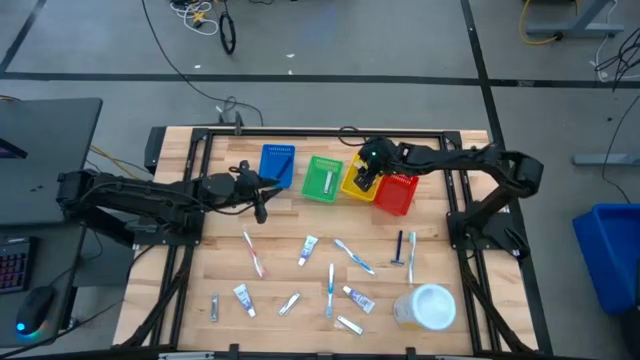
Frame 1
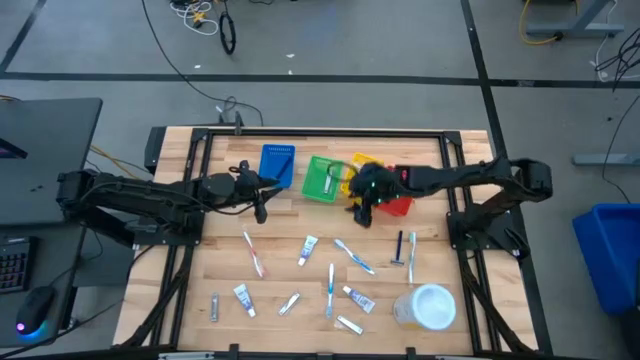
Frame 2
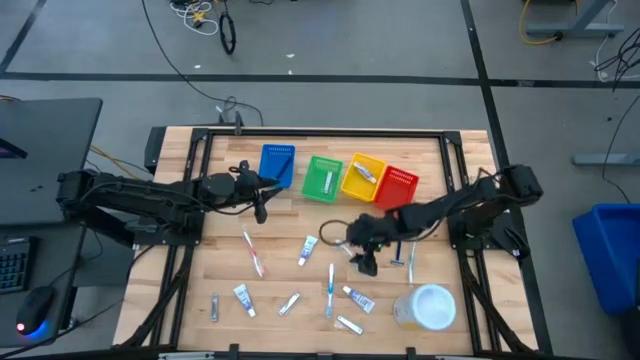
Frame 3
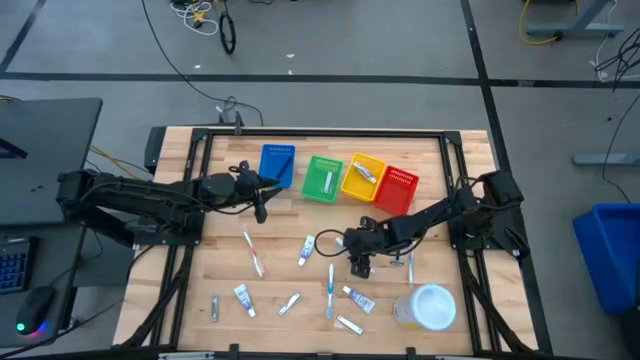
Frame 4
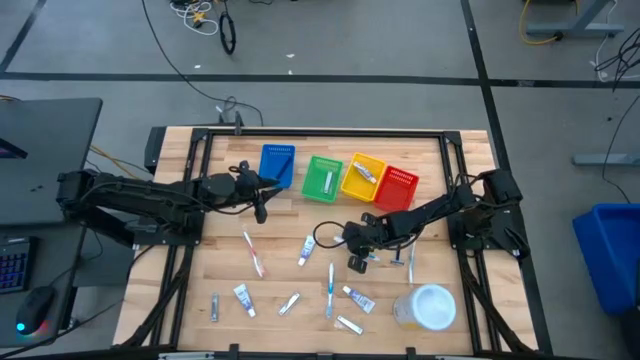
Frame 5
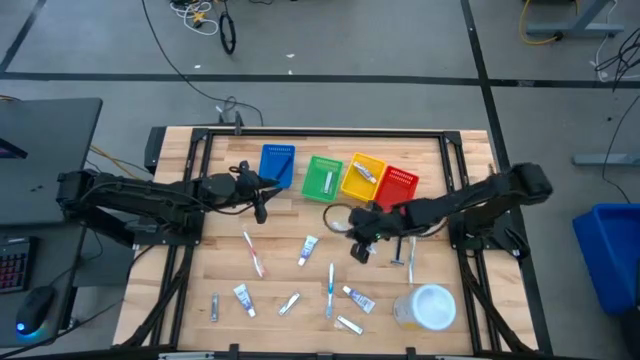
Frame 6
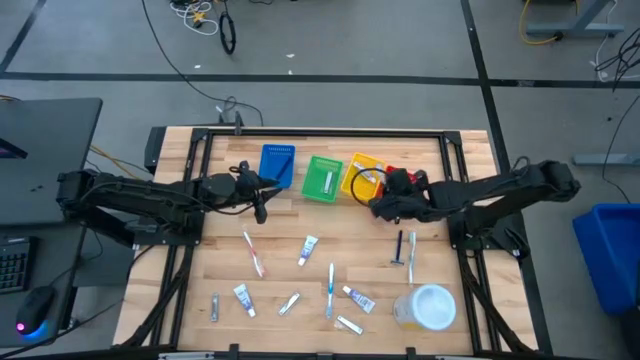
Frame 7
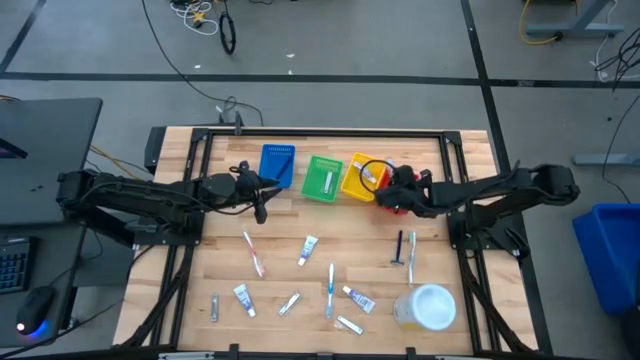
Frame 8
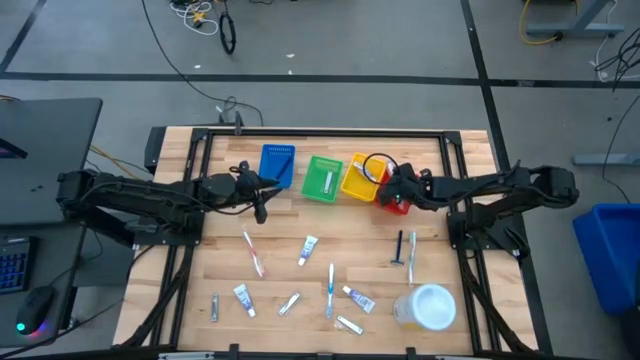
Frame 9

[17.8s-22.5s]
Task: Pick & Place Travel size toiletries
Put the right blue toothbrush into the red bin

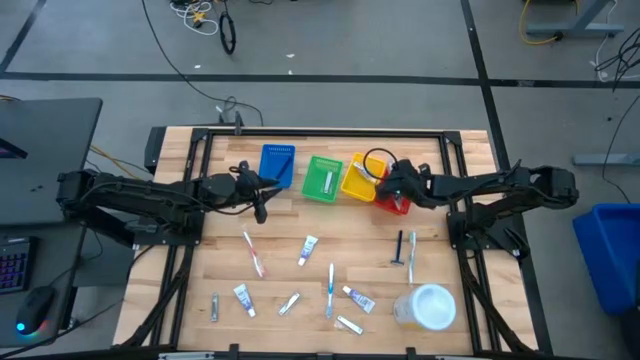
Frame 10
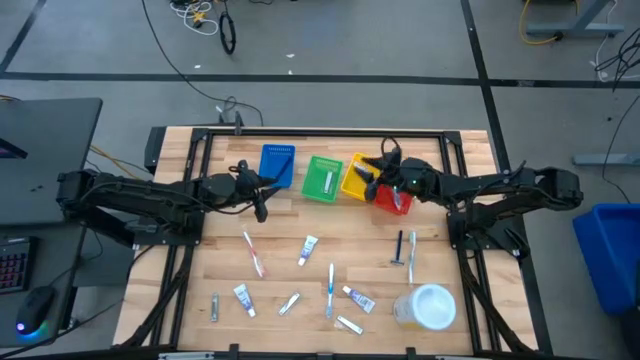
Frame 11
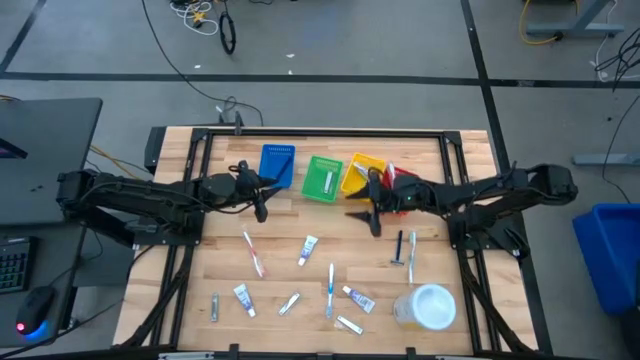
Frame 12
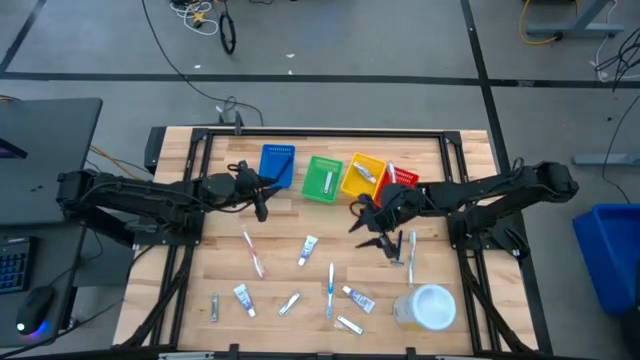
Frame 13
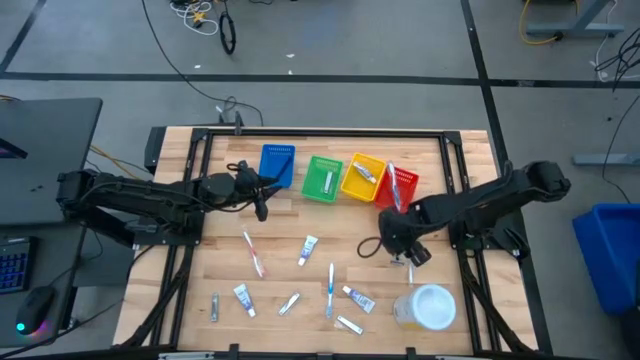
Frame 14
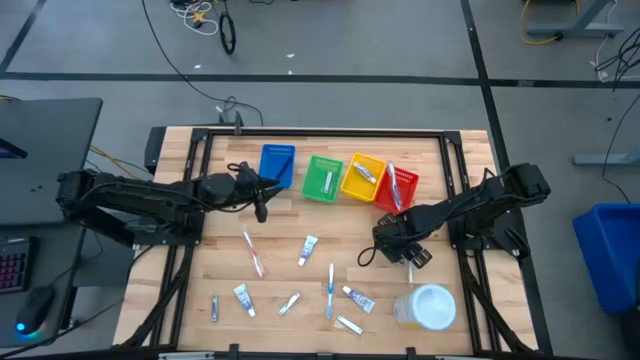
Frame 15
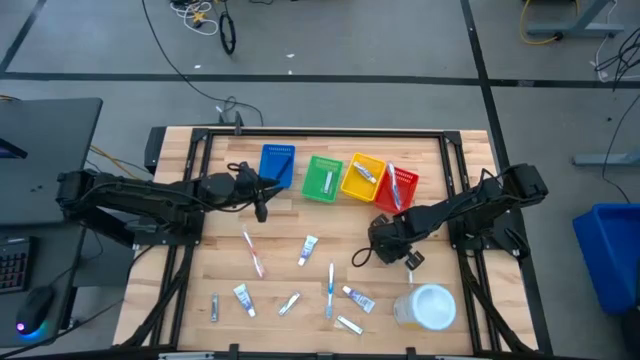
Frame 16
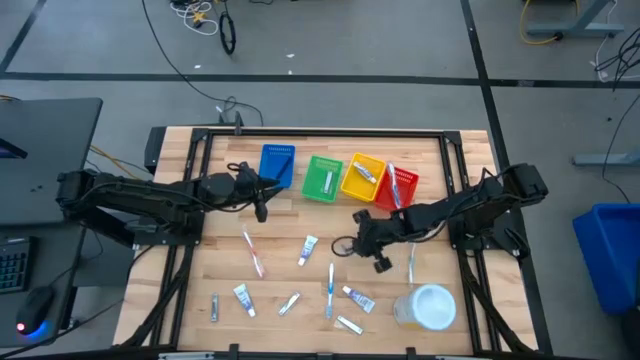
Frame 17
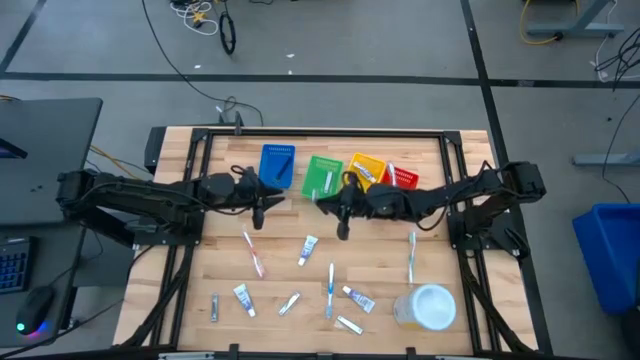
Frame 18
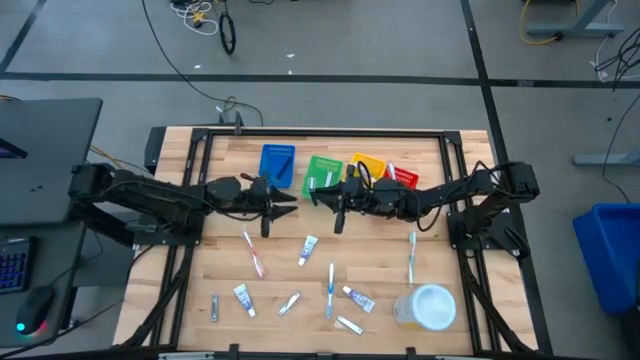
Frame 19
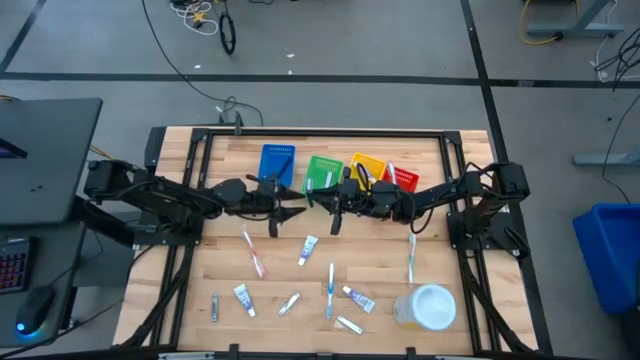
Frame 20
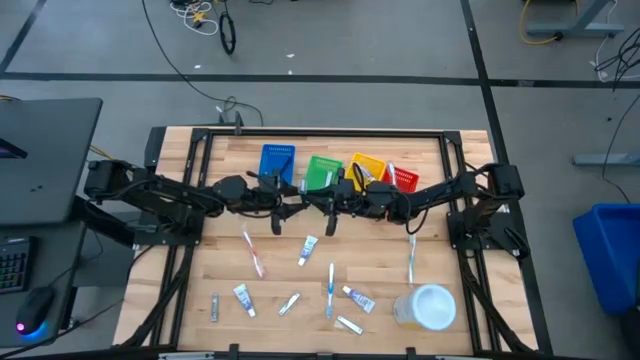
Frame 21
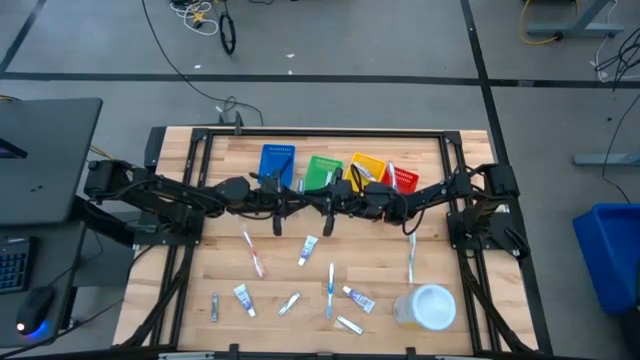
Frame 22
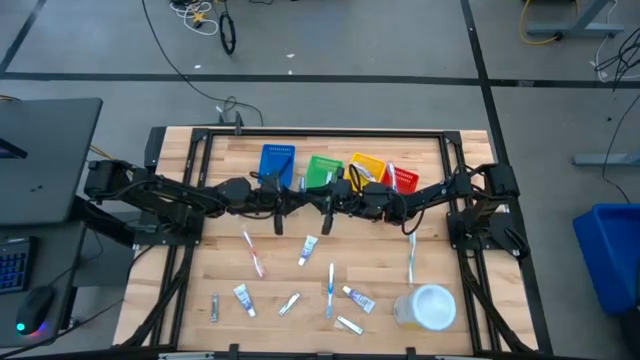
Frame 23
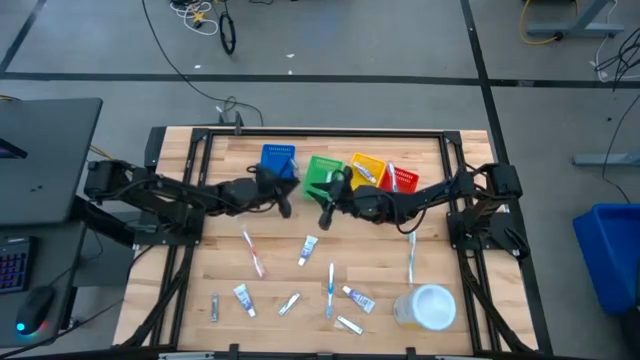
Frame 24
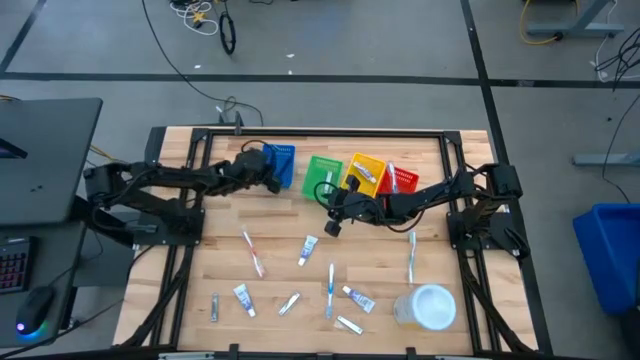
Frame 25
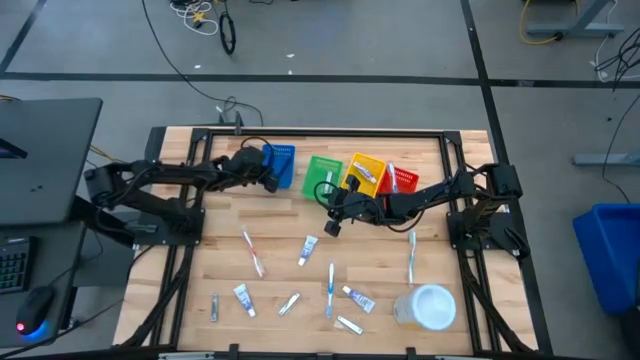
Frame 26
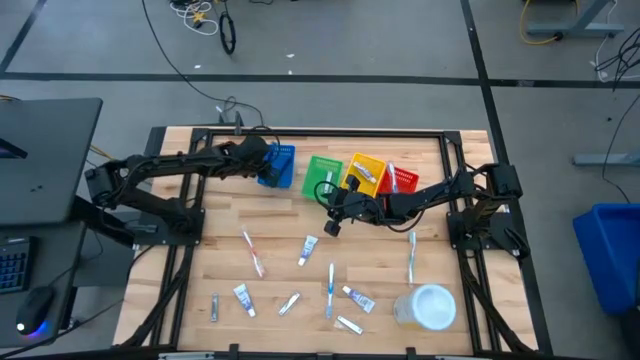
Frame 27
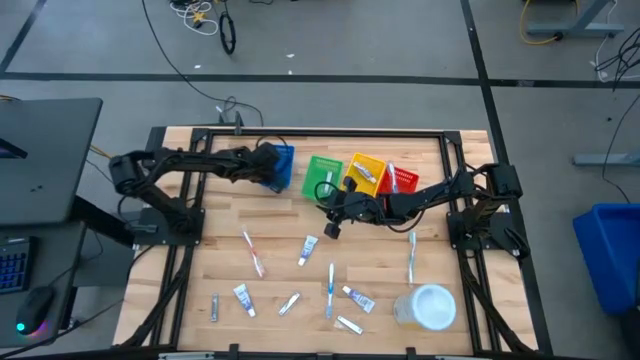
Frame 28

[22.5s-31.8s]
Put the blue razor into the blue bin

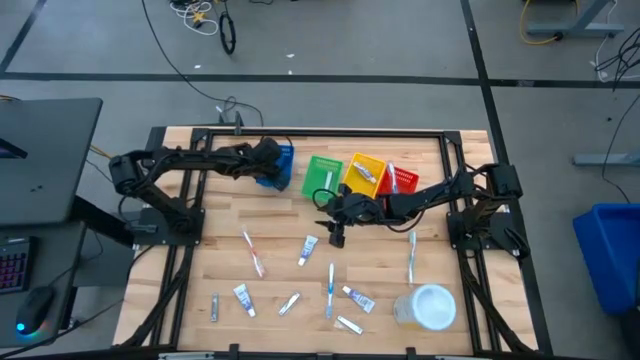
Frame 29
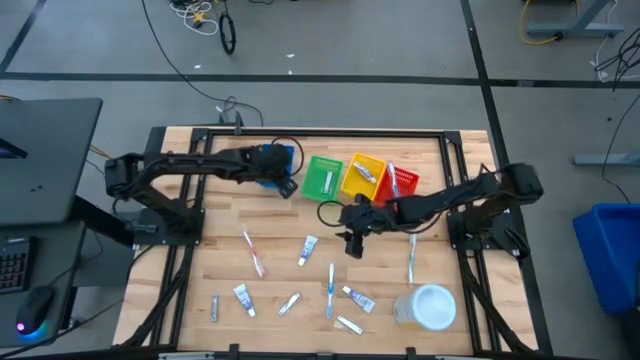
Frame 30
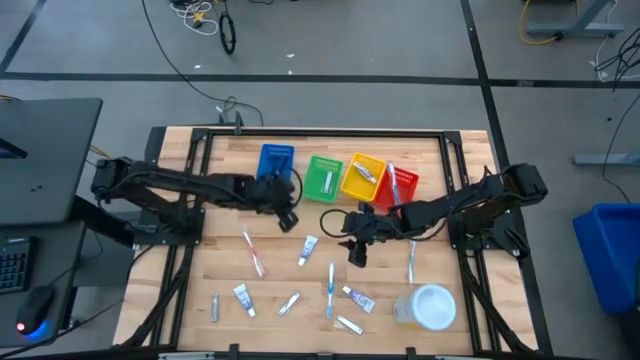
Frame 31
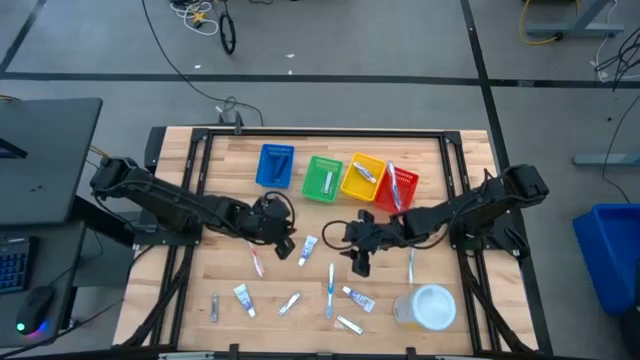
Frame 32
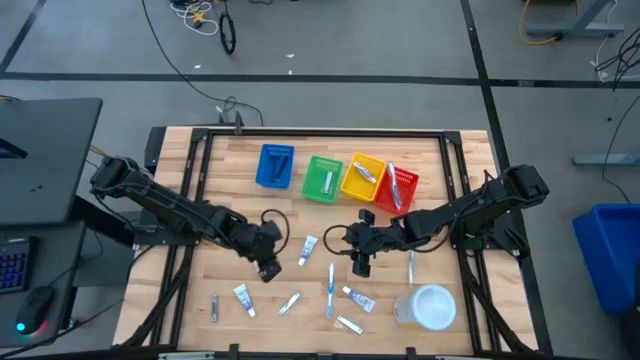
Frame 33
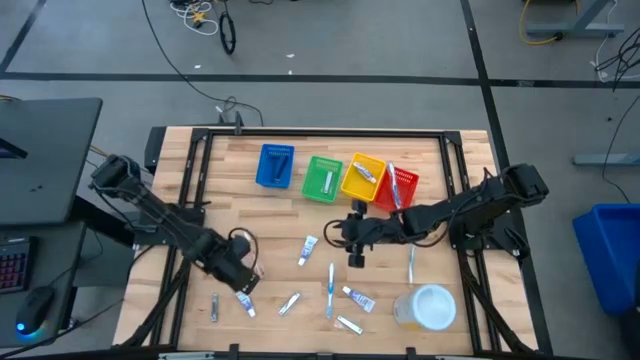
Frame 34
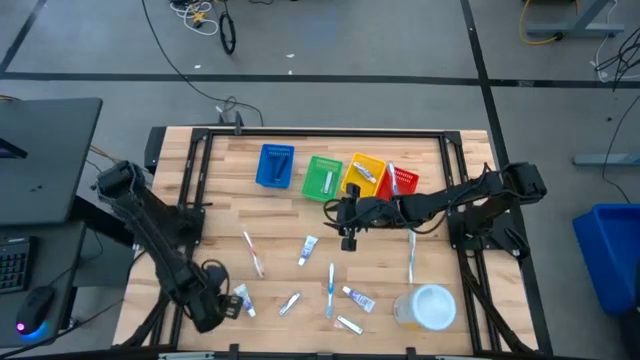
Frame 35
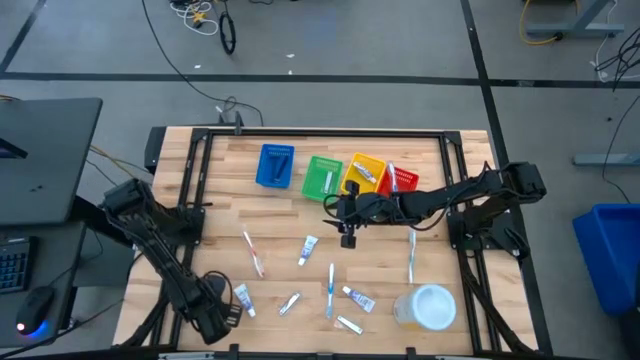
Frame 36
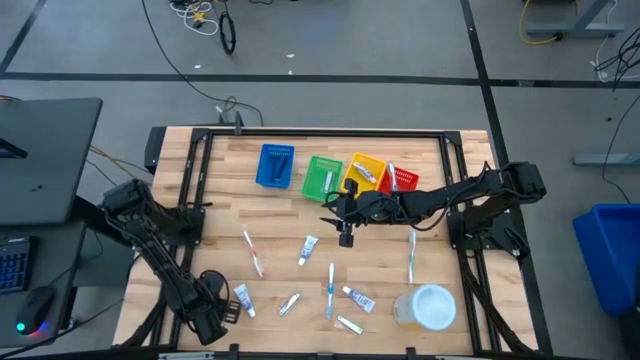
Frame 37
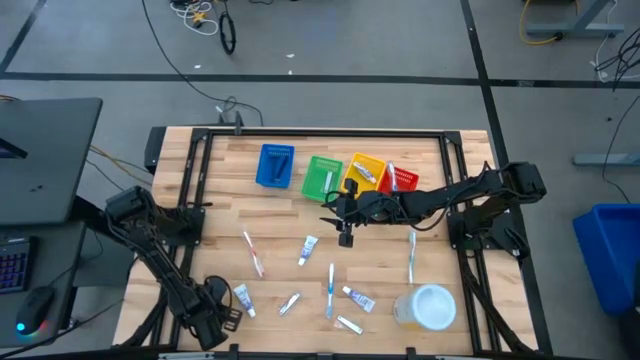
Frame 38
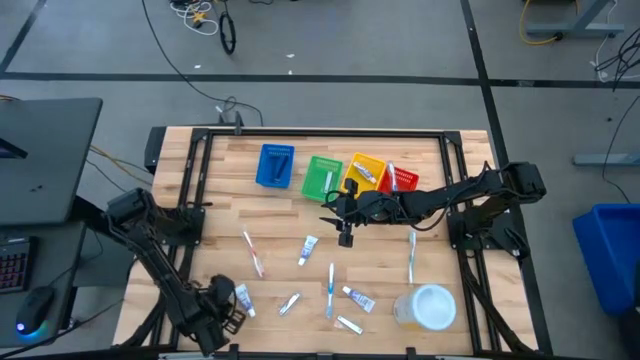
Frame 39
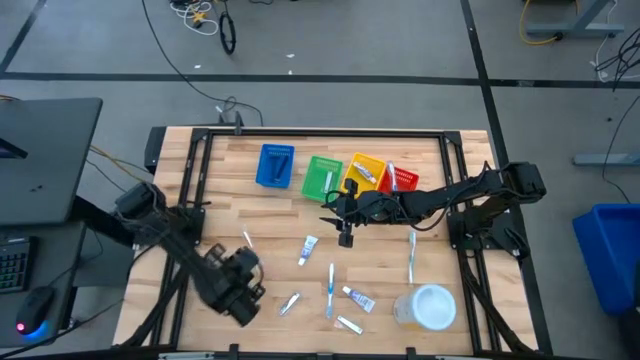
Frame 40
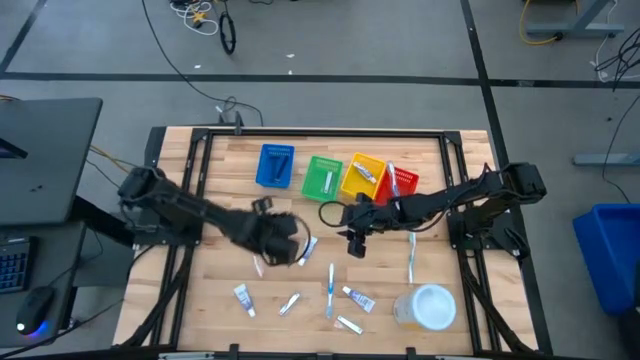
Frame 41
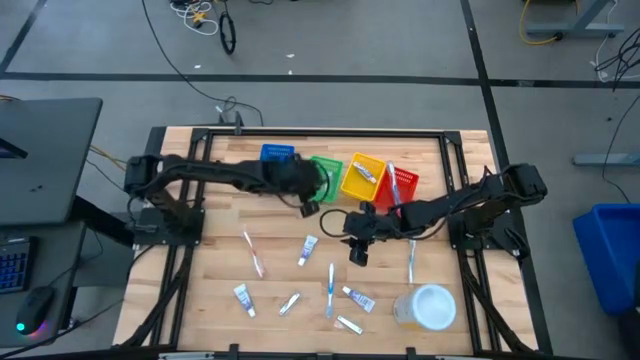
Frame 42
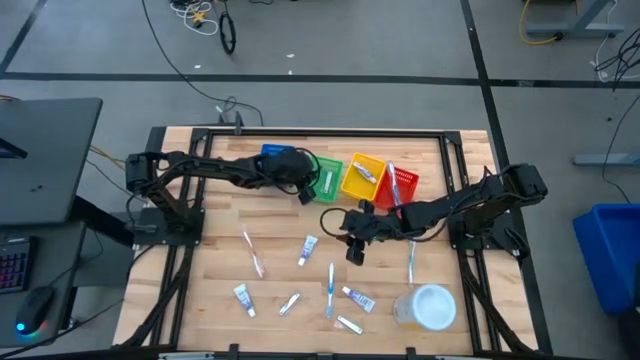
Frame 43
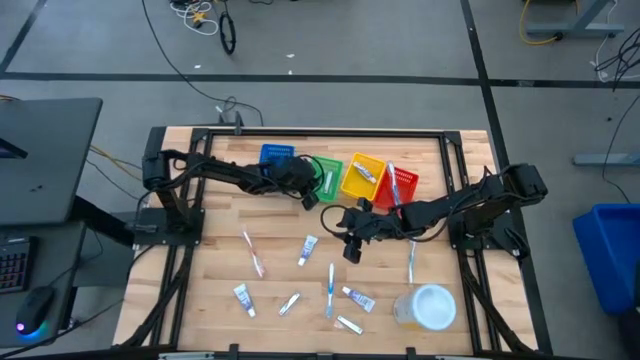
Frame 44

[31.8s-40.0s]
Put the left silver nail cutter into the green bin

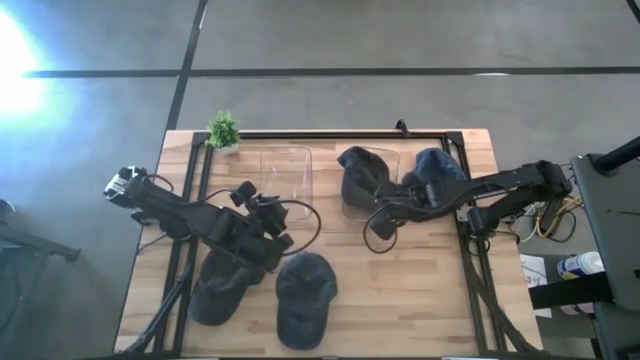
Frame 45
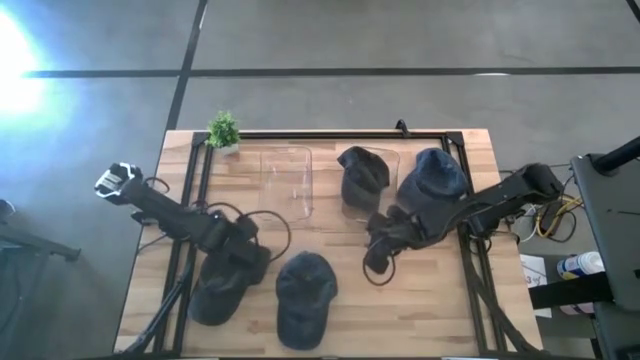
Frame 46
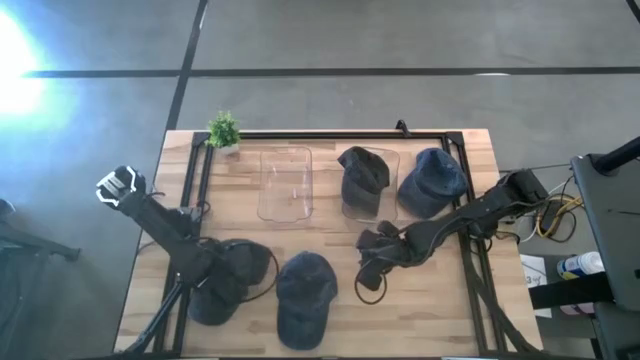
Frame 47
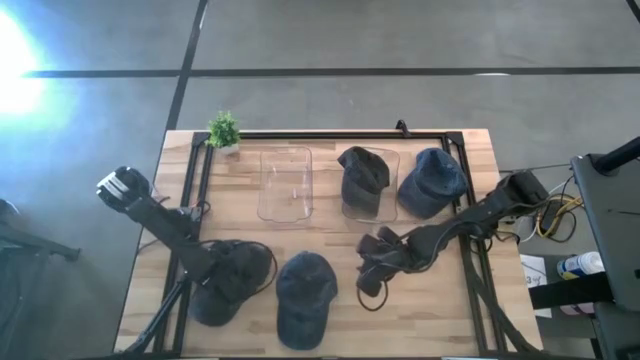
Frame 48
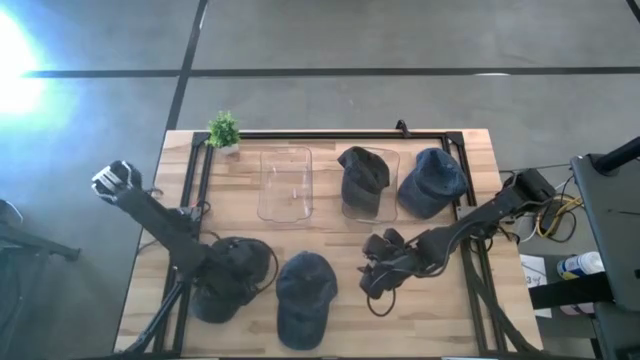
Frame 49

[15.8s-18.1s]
Task: Pick & Place hat
Put the gray cap into the right transparent bin
